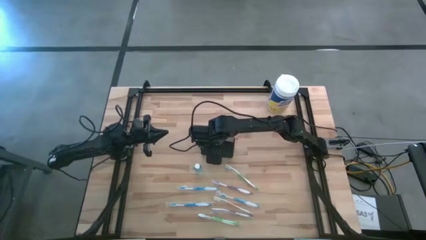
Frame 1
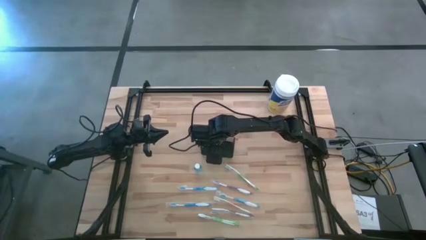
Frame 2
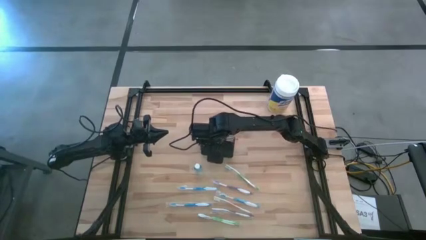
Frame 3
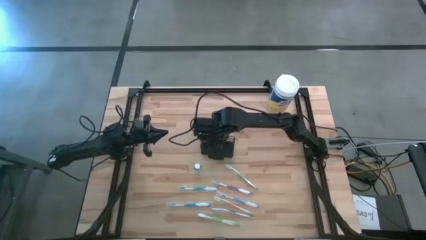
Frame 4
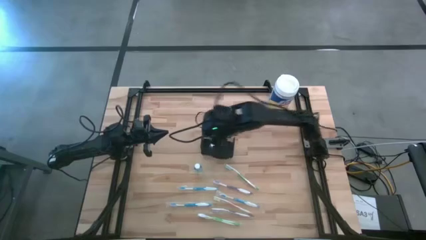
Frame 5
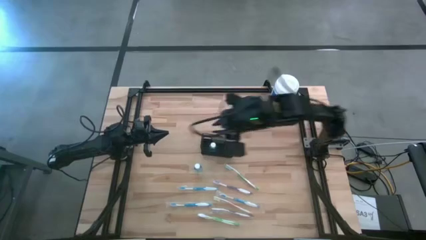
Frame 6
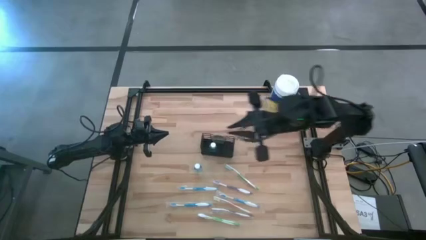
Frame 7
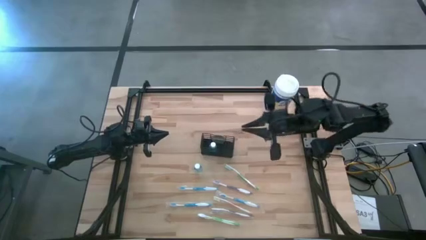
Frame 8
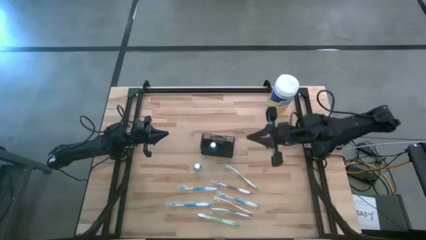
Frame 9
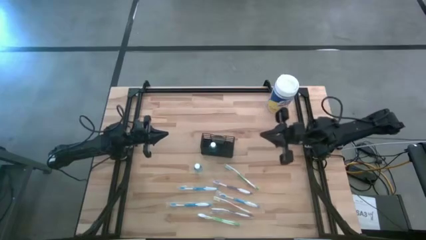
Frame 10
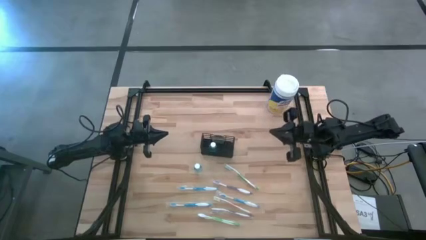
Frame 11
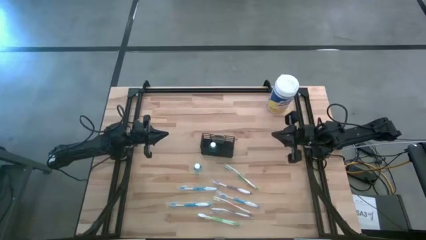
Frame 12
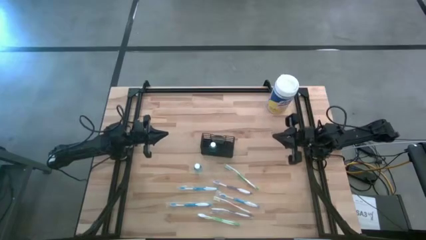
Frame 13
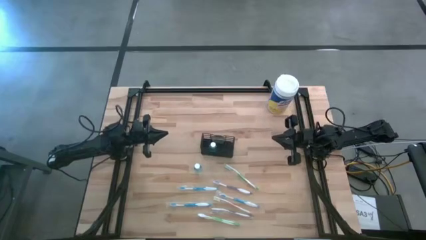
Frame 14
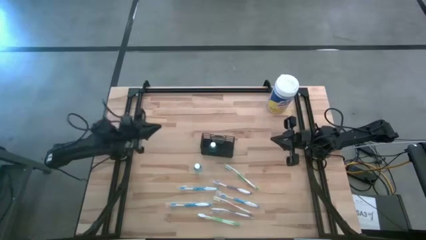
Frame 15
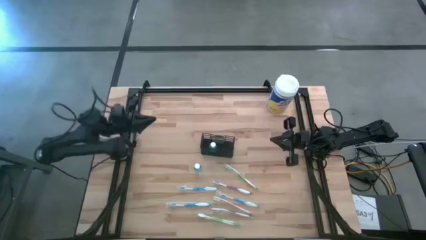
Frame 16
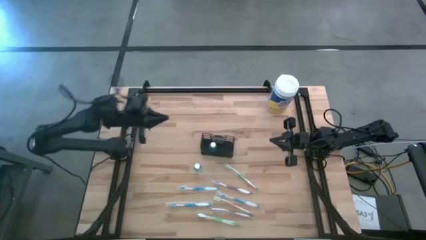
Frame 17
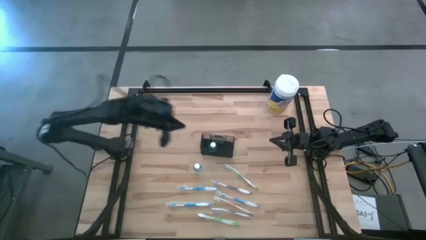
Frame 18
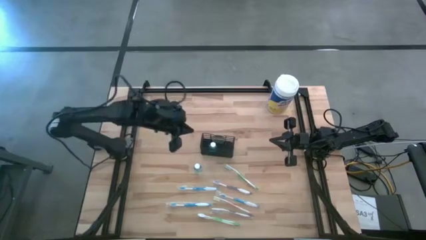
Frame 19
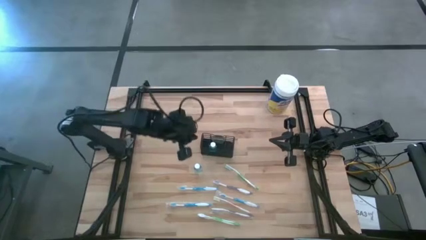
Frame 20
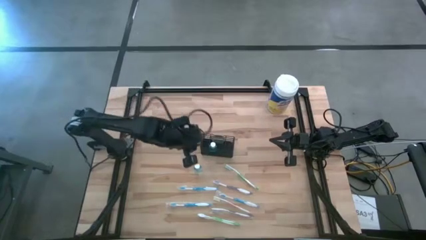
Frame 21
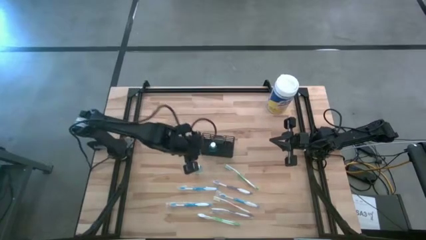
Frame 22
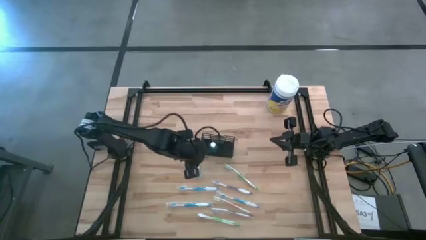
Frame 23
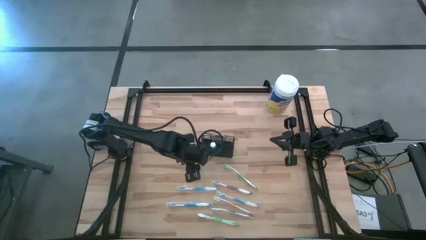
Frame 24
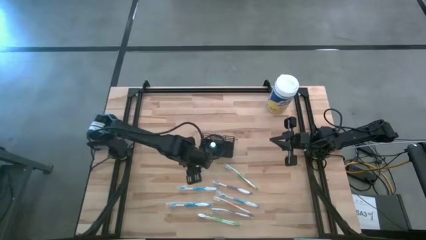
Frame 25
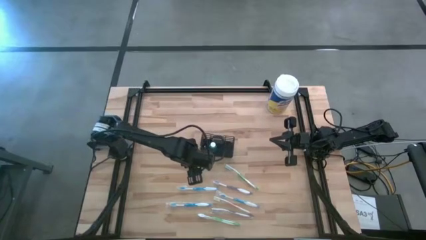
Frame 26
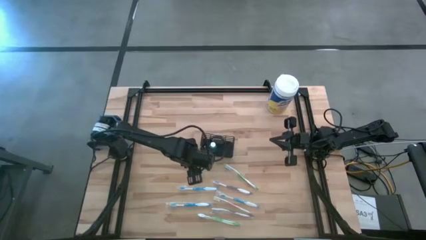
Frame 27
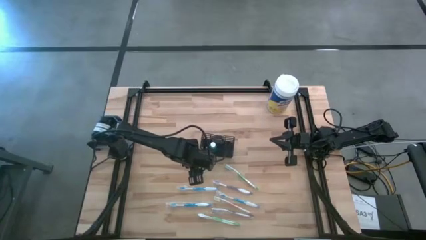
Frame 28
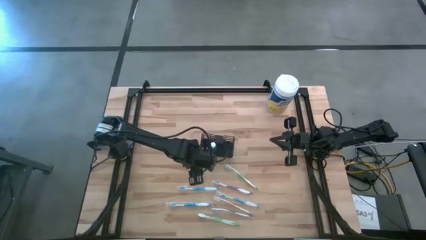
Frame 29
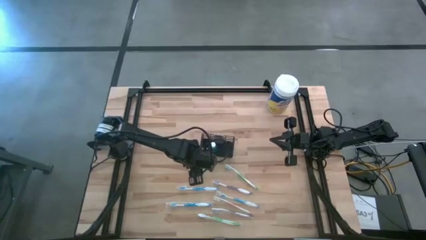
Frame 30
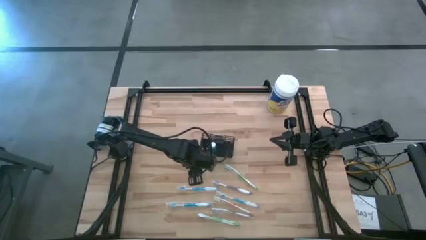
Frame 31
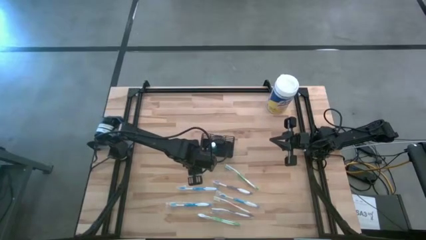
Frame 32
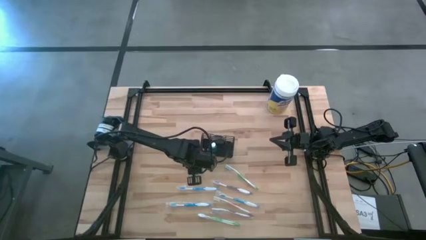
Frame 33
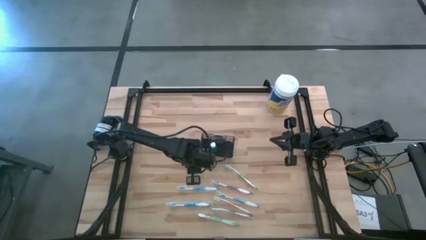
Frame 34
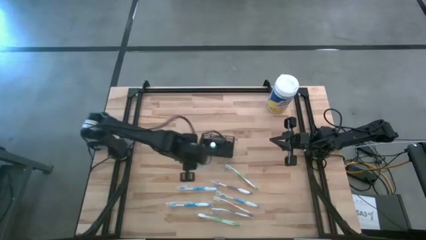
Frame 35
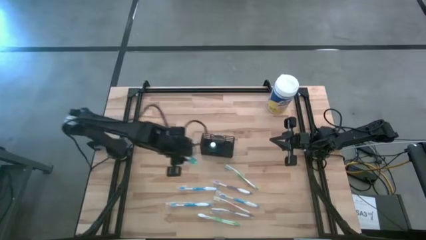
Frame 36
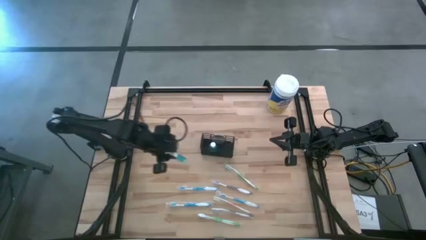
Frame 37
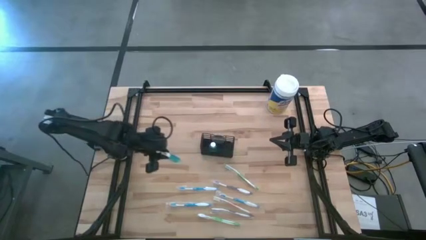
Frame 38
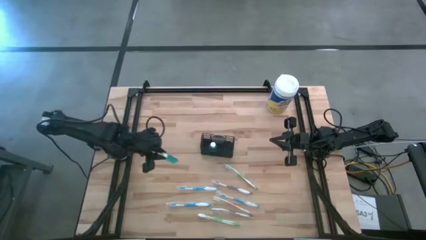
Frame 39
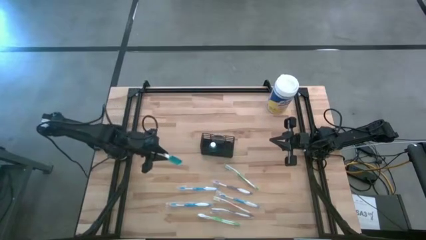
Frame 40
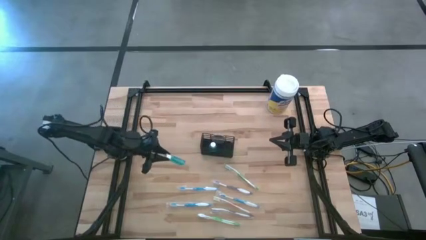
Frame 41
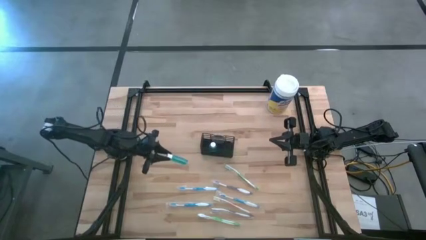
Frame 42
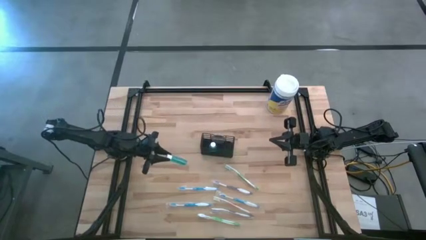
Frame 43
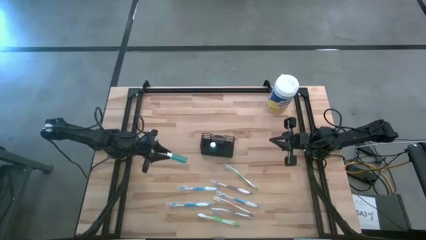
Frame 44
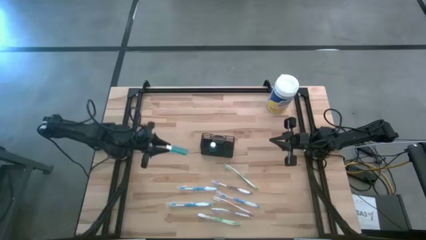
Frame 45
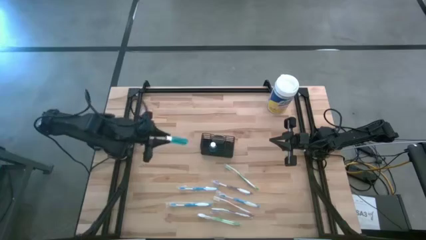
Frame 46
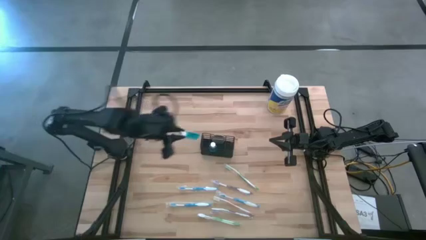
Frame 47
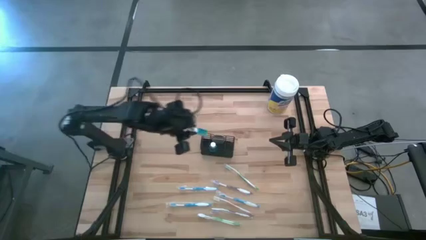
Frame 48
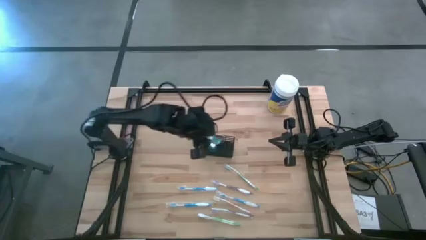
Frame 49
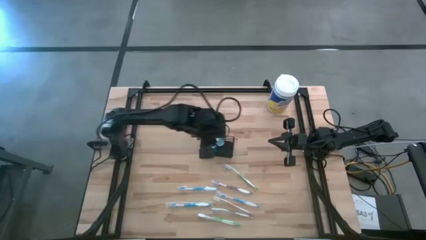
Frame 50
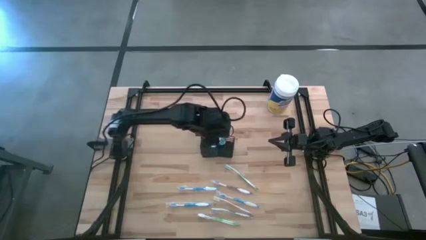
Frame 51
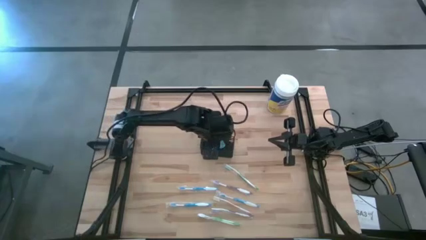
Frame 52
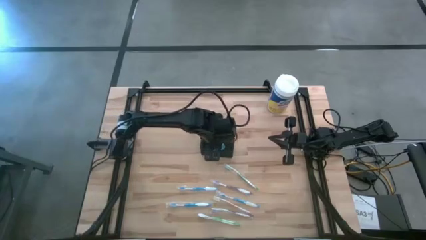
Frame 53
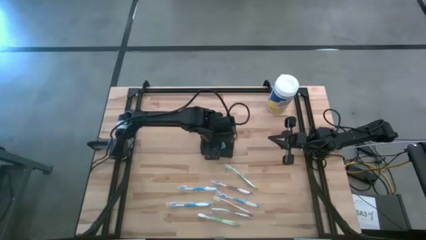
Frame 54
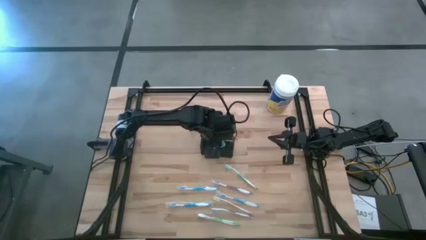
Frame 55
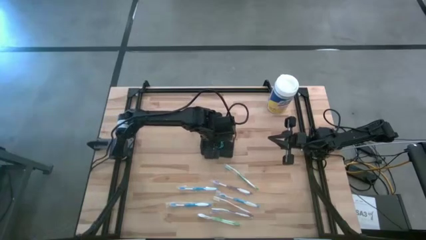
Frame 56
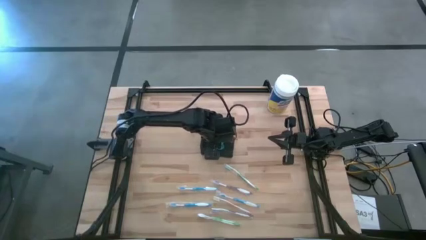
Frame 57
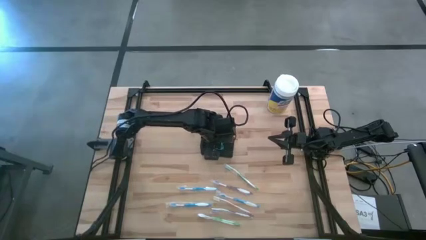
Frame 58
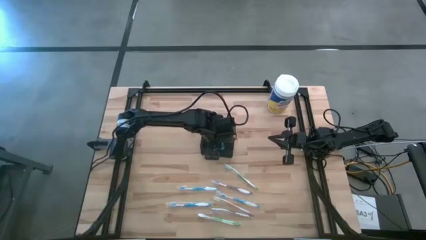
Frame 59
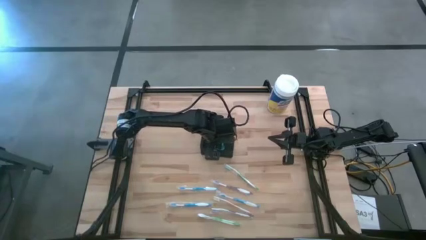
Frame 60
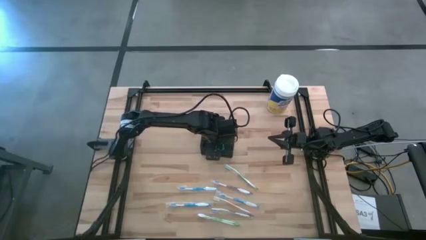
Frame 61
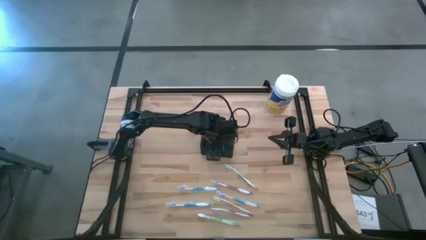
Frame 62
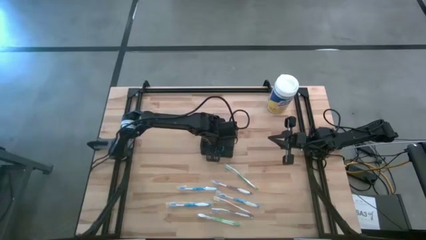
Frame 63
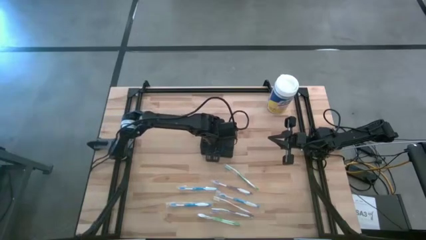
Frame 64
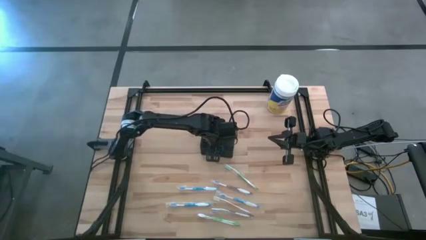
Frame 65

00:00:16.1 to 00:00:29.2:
Task: Pick & Place toothbrushing station
Put the mouthwash into the wire organizer

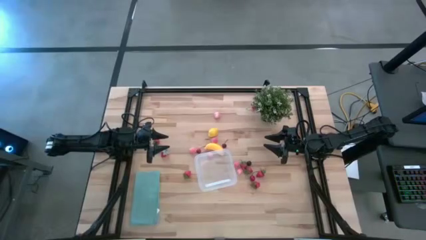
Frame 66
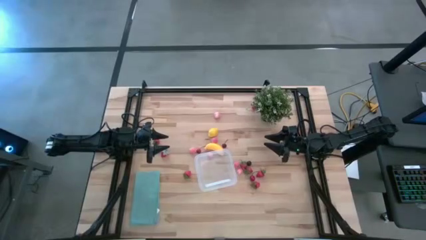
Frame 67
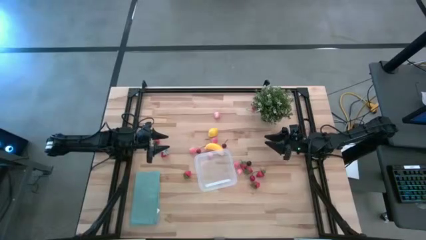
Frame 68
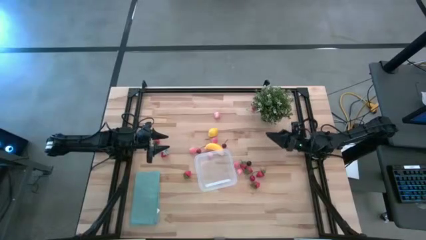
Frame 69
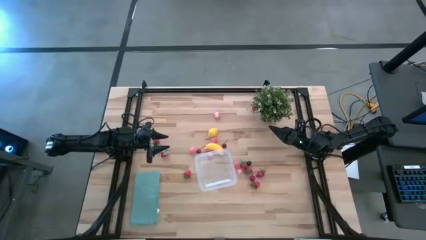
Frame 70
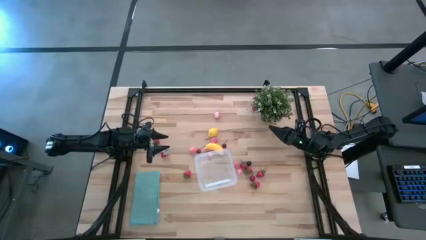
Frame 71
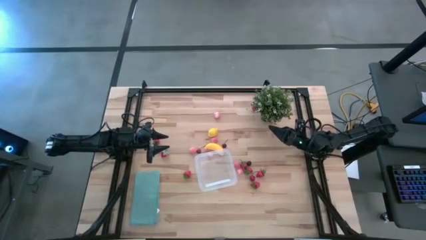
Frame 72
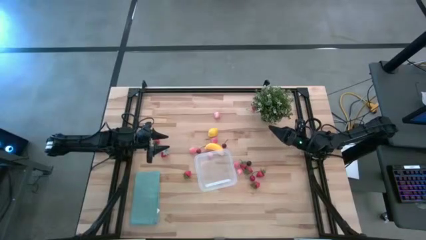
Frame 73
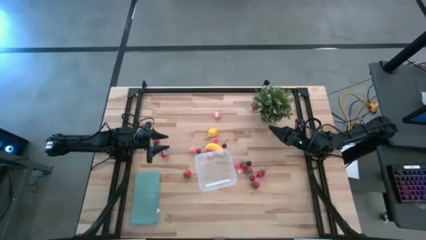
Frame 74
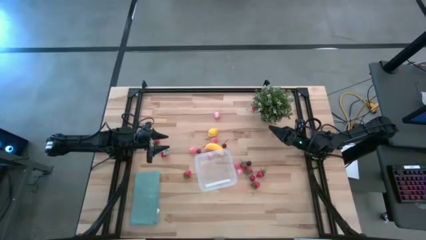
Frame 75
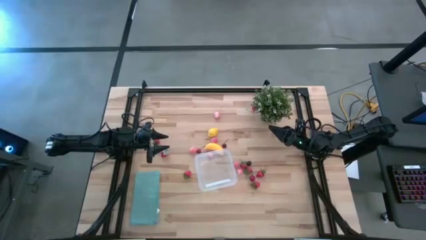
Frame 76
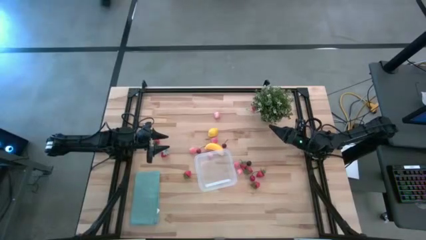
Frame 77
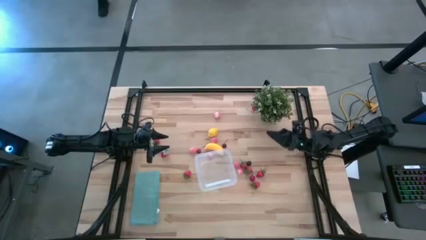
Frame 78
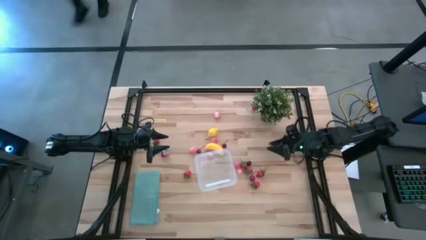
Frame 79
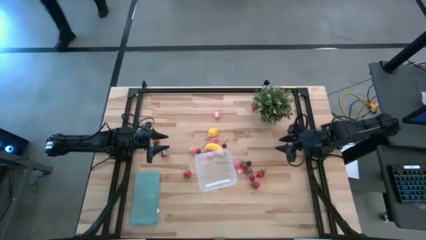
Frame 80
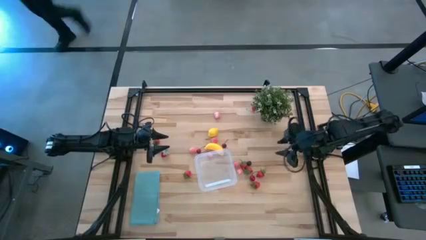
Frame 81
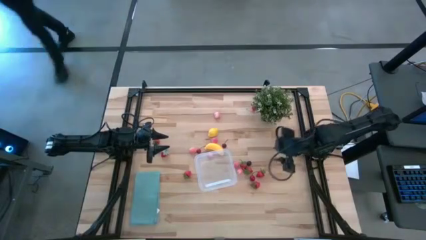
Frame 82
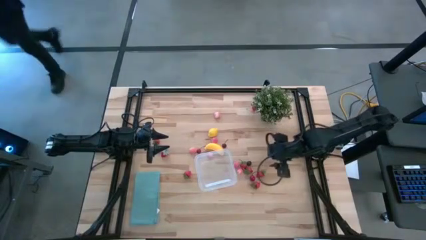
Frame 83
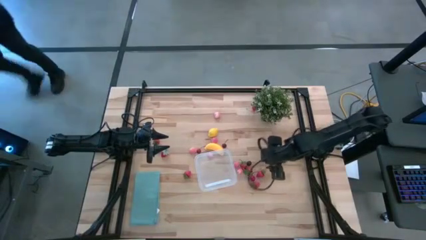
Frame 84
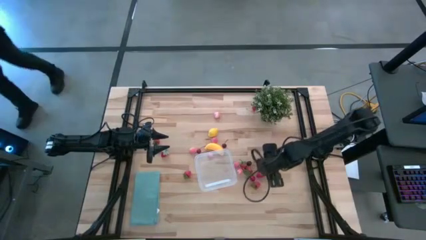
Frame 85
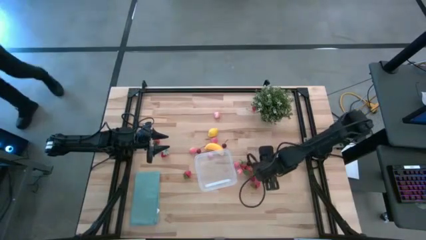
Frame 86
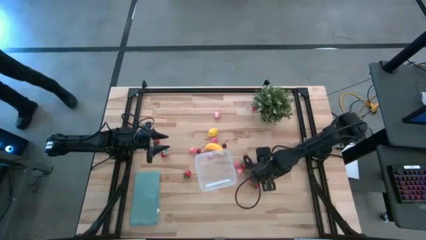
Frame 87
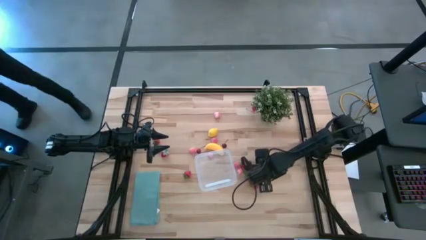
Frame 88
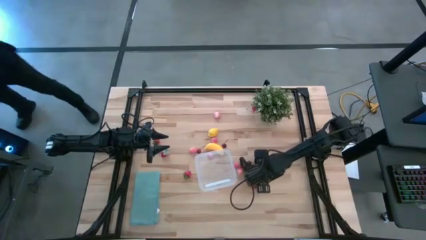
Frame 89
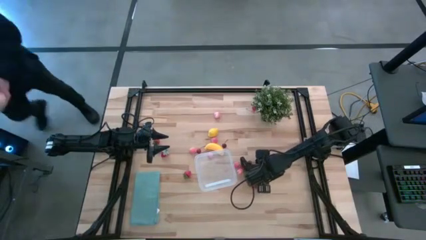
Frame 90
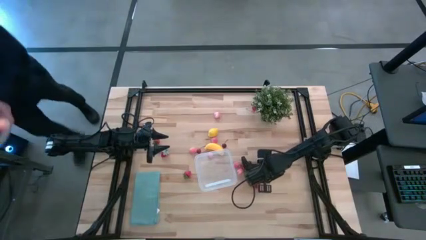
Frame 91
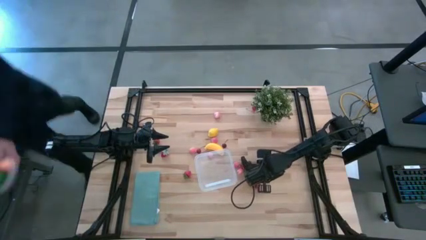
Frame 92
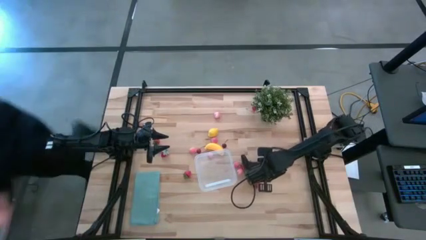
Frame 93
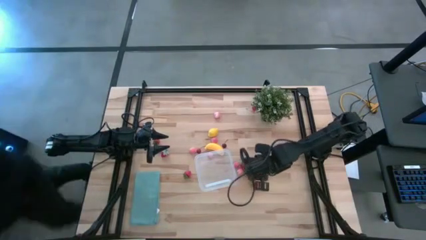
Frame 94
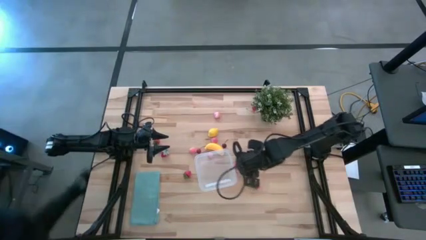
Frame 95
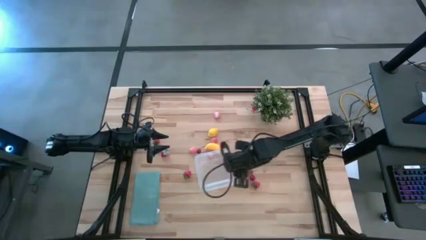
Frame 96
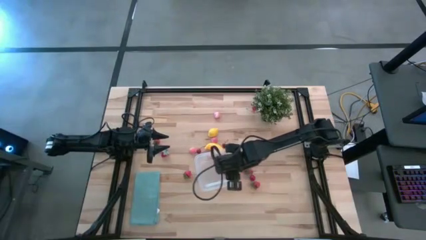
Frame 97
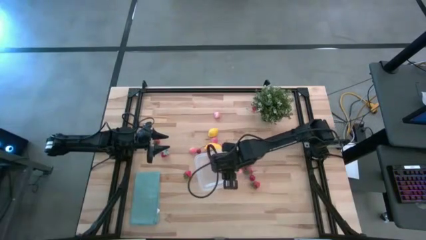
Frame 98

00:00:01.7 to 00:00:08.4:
Task: Pick and placing Produce into tupperware
Put the red strawberry into the transparent bin
